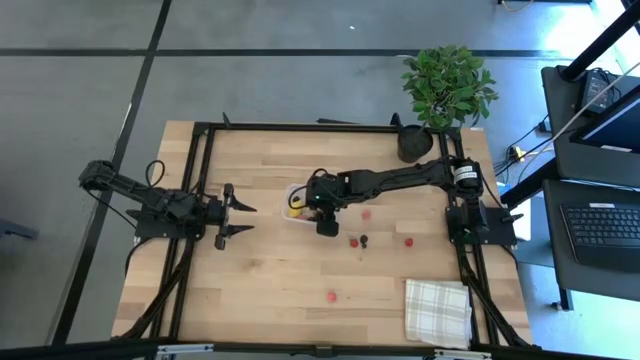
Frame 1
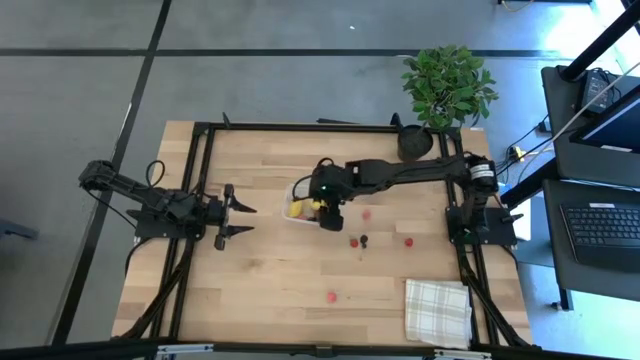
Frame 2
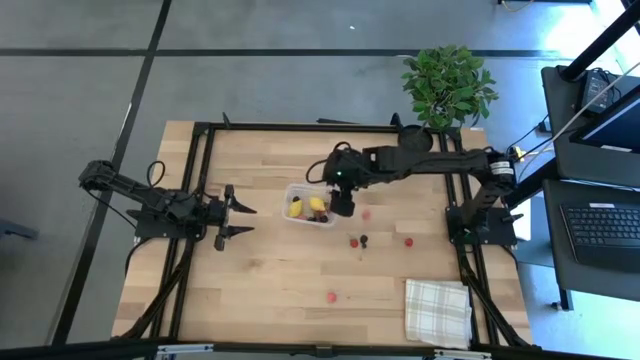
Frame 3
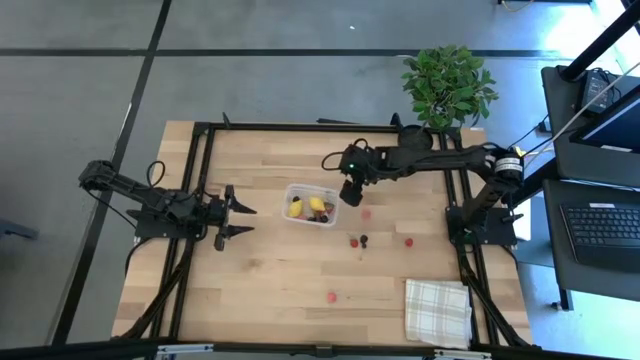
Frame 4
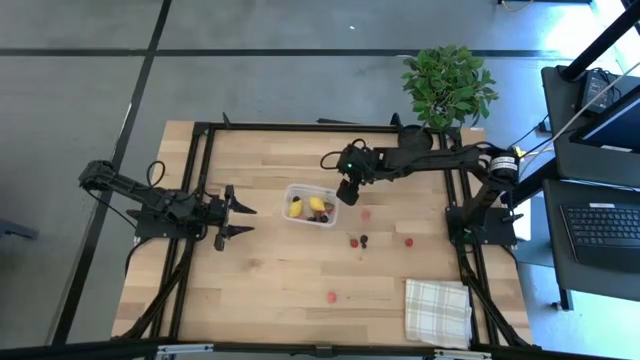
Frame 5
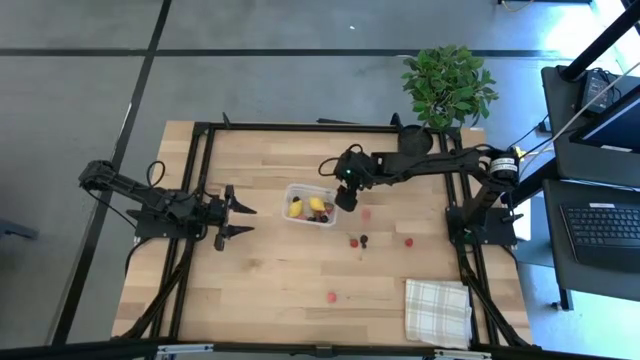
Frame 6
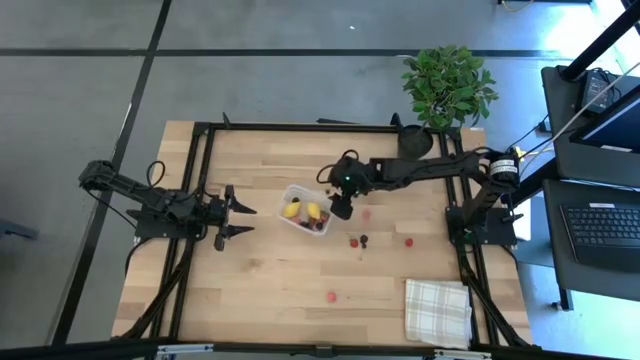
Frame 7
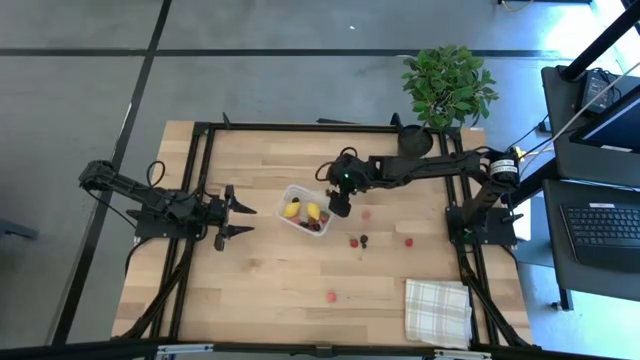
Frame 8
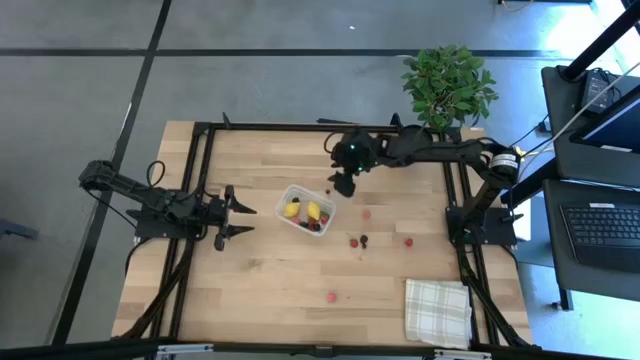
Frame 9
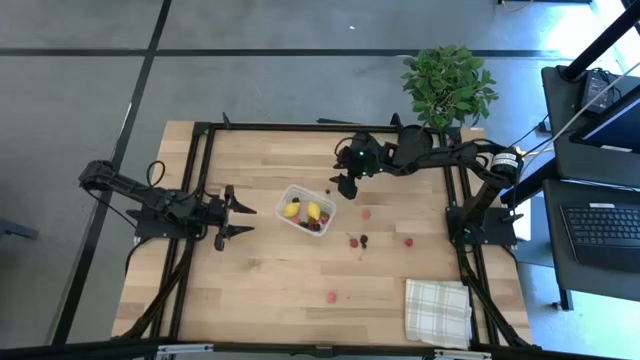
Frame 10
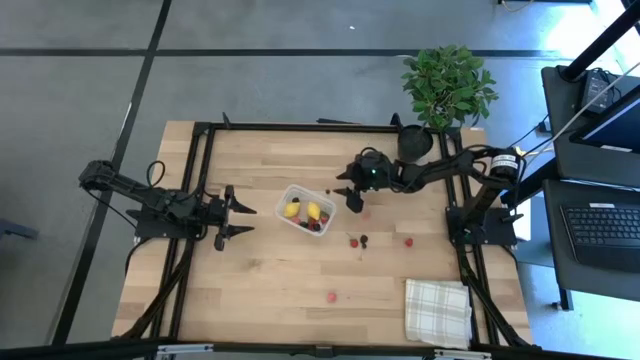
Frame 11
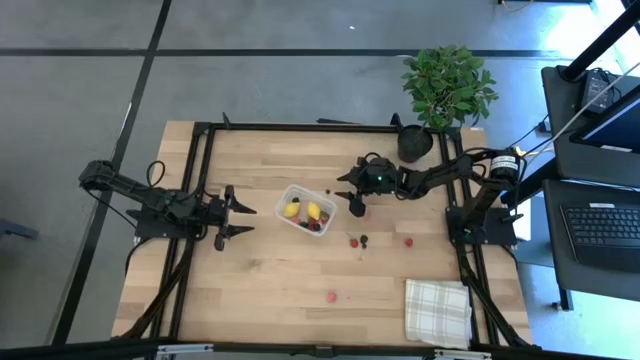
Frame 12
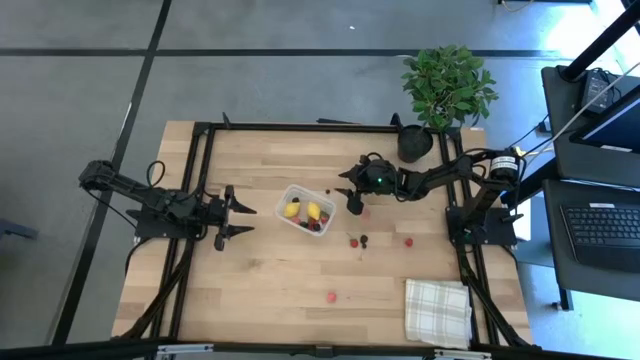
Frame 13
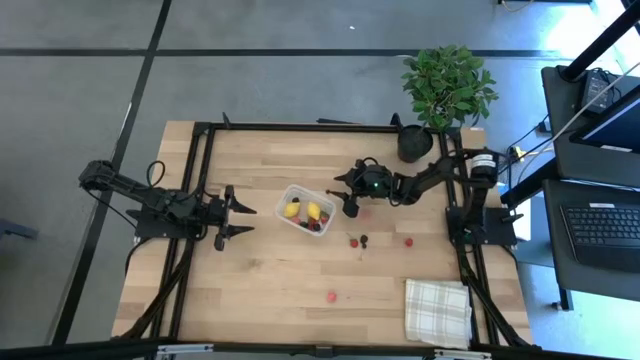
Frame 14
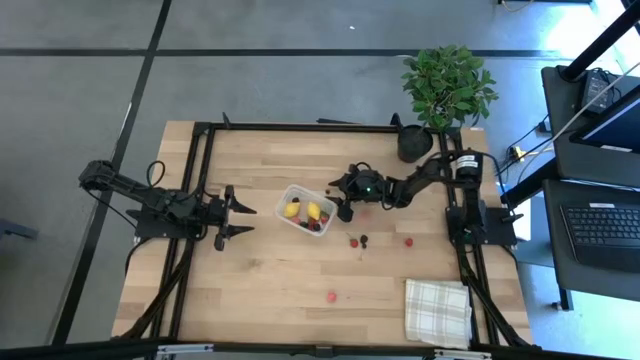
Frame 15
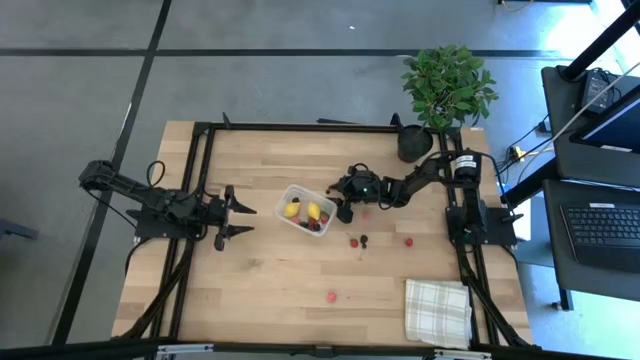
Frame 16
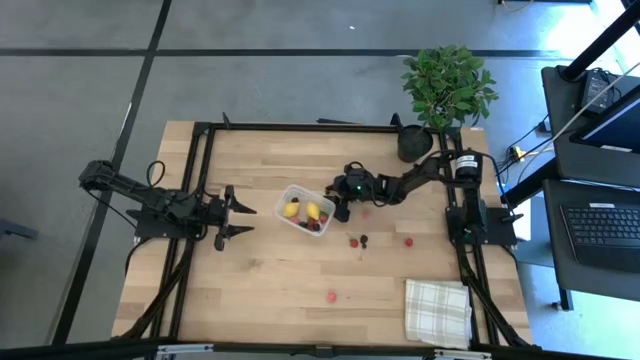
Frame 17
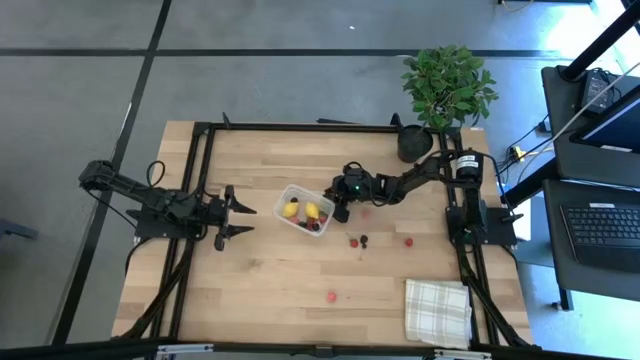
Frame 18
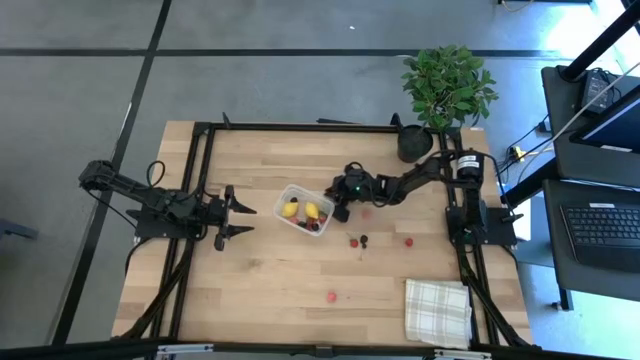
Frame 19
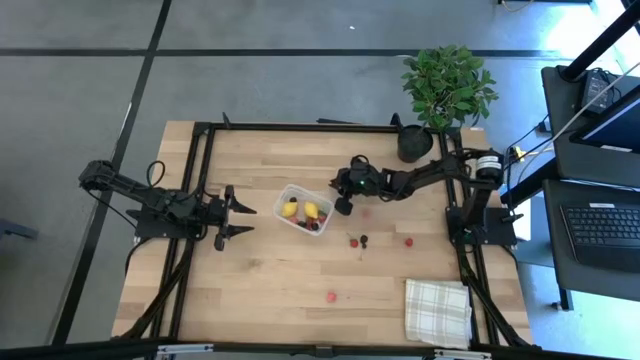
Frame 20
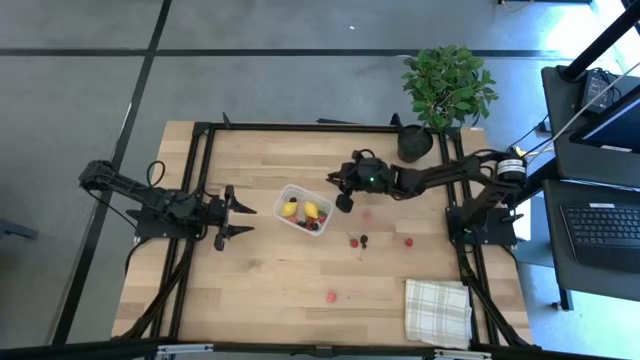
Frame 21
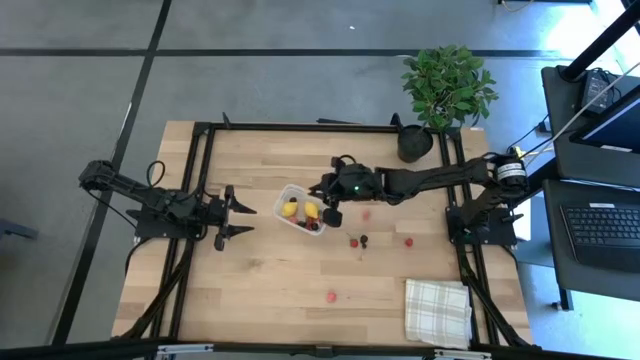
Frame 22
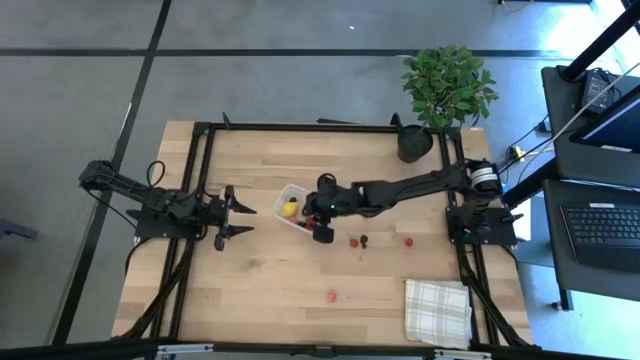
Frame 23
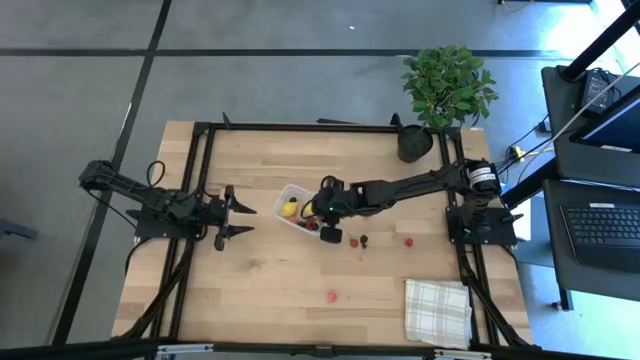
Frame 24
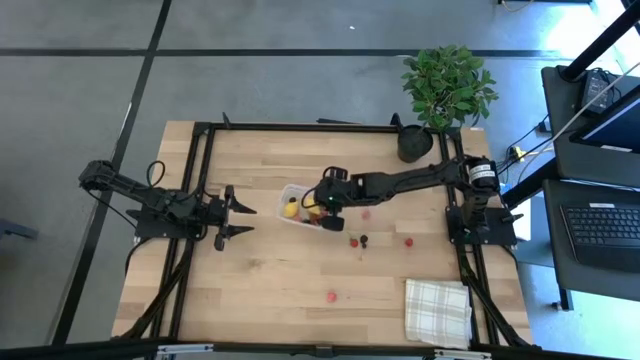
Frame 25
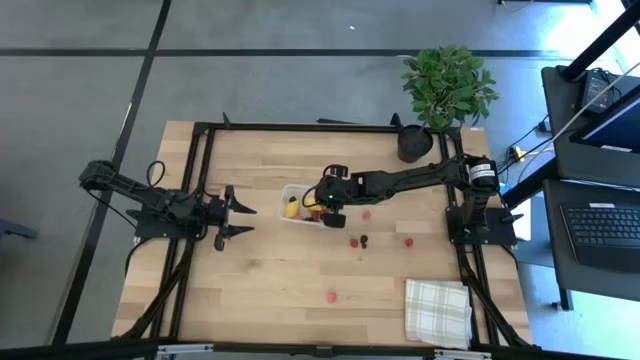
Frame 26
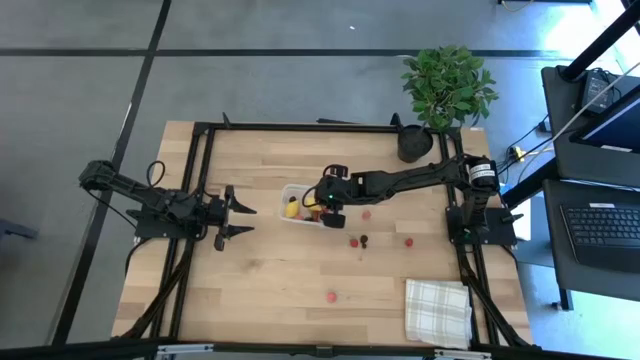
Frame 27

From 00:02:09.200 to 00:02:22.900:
Task: Pick and placing Produce into tupperware
Put the top blueberry into the transparent bin

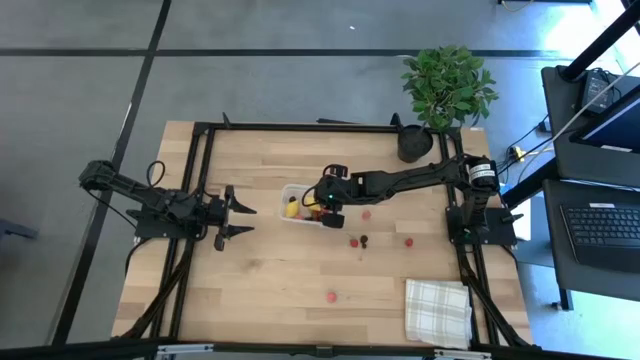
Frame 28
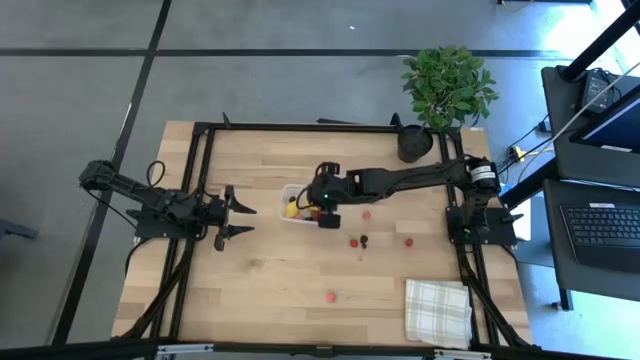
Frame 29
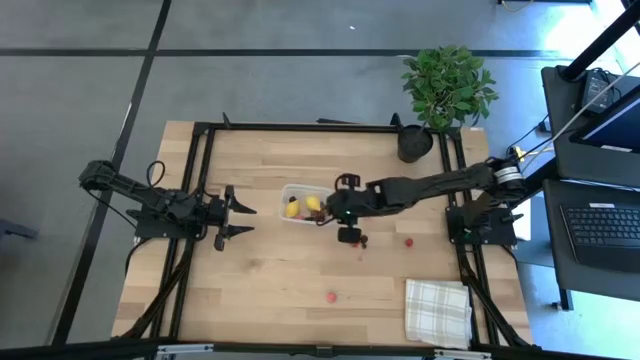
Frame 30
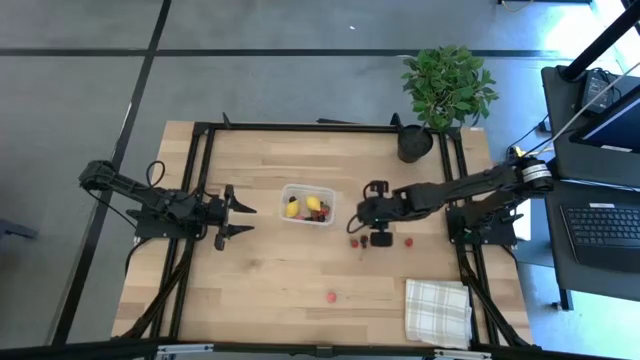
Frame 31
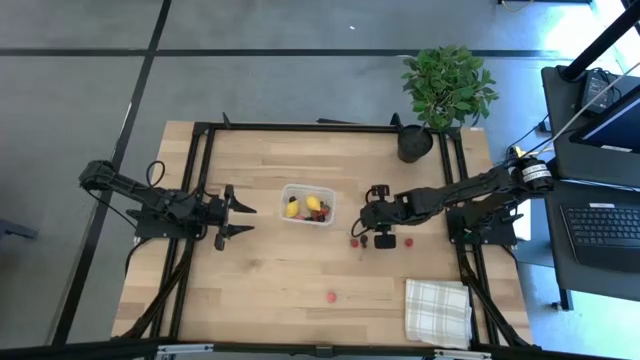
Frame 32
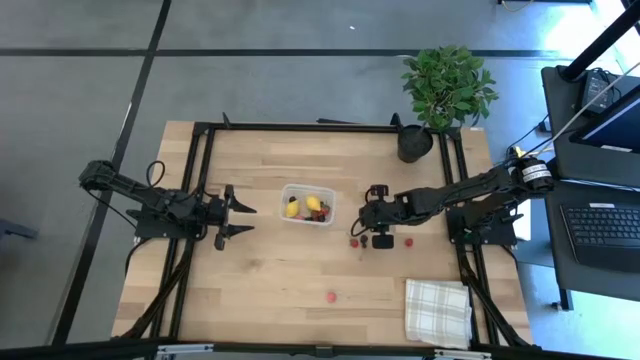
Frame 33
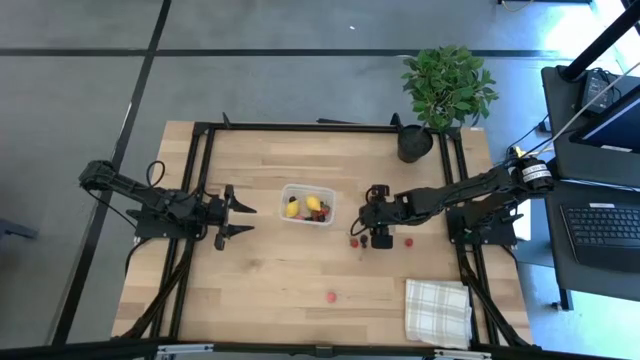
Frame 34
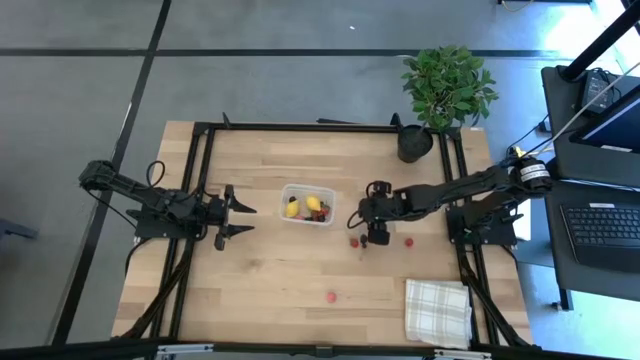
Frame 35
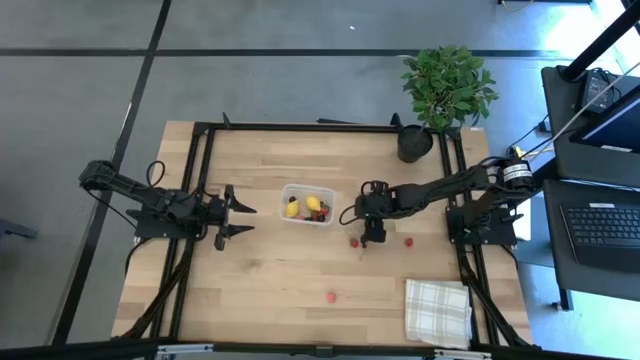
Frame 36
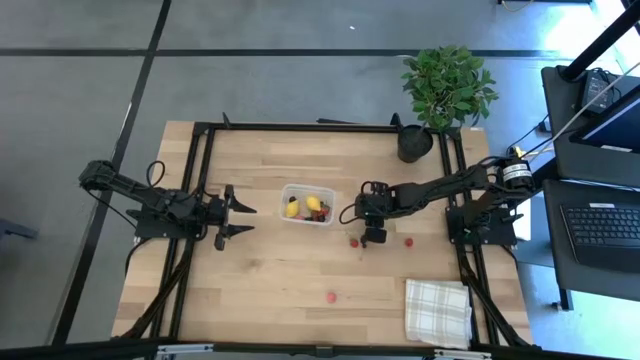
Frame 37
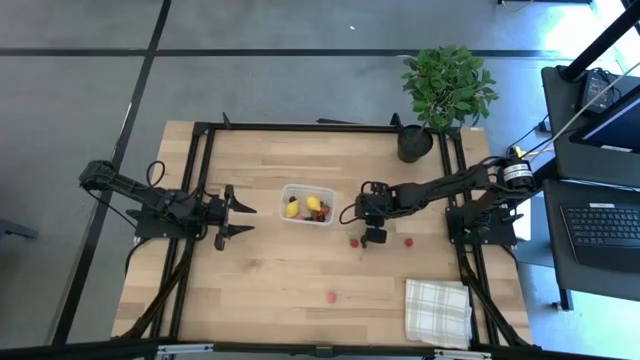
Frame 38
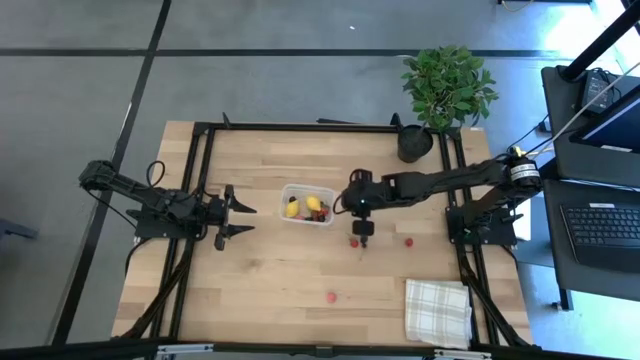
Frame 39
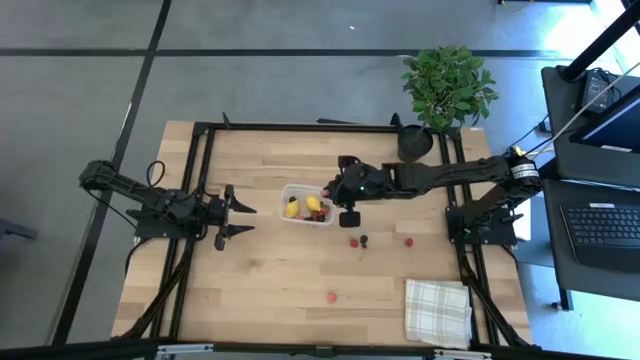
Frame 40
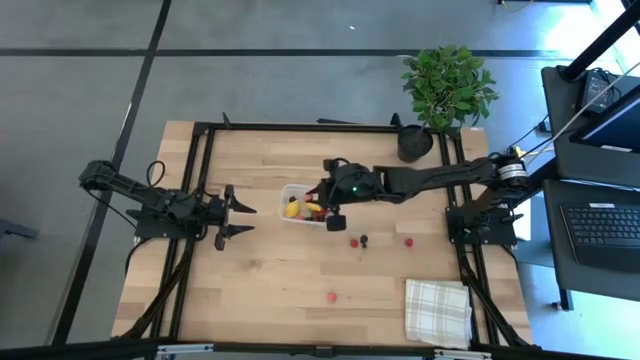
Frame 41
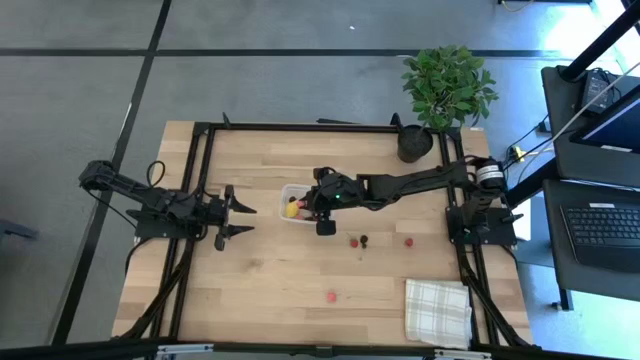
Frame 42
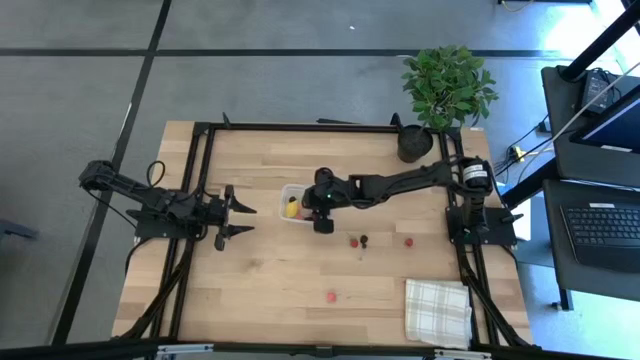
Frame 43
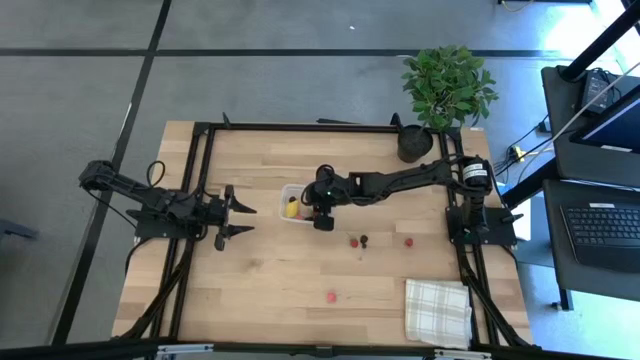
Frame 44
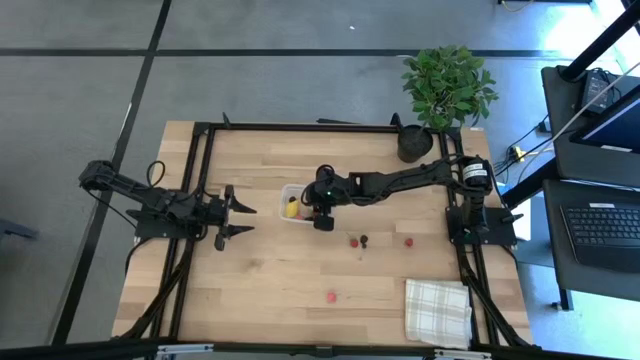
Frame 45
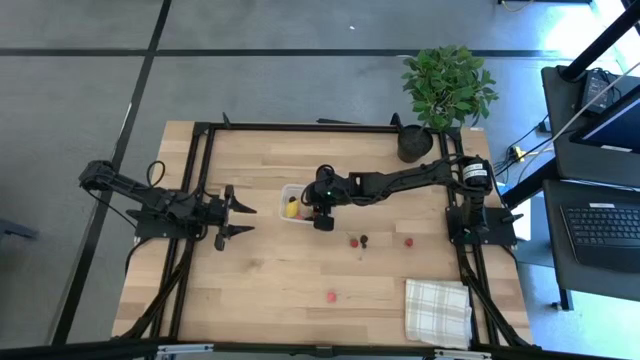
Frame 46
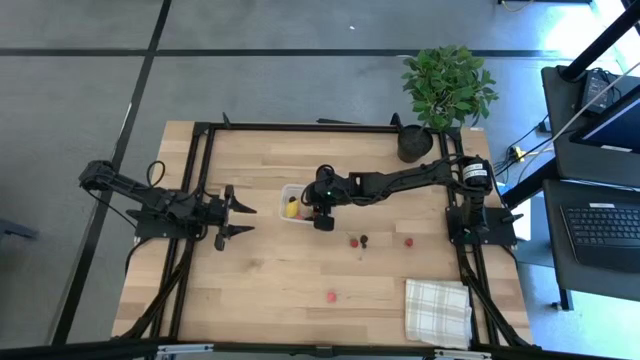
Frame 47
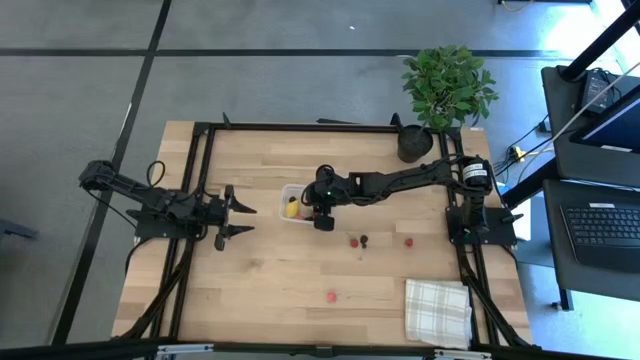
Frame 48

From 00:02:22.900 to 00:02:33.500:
Put the top apricot into the transparent bin
